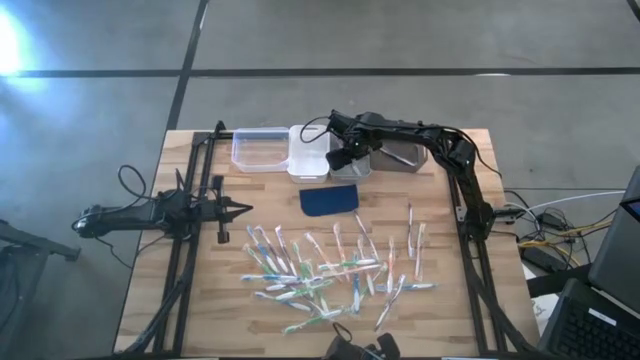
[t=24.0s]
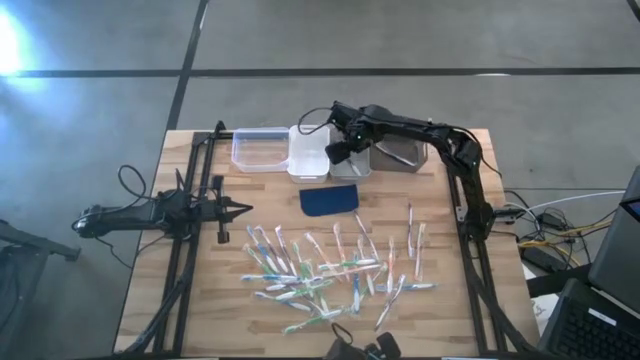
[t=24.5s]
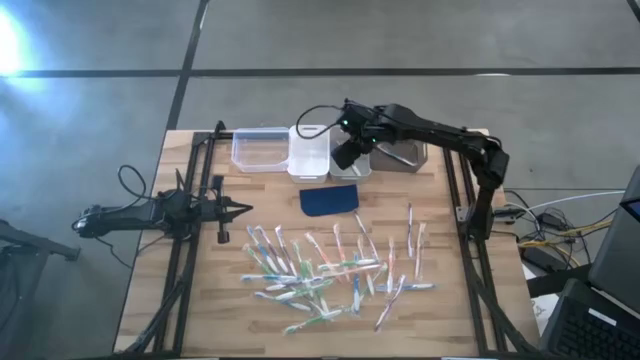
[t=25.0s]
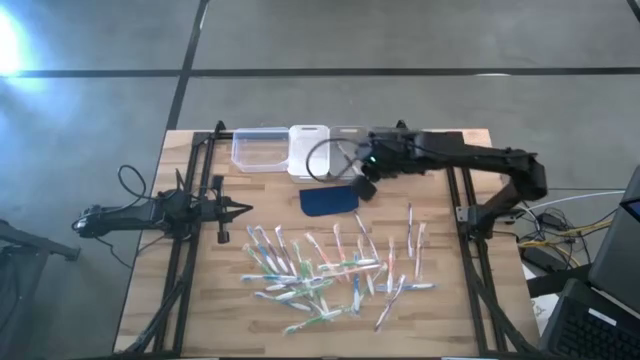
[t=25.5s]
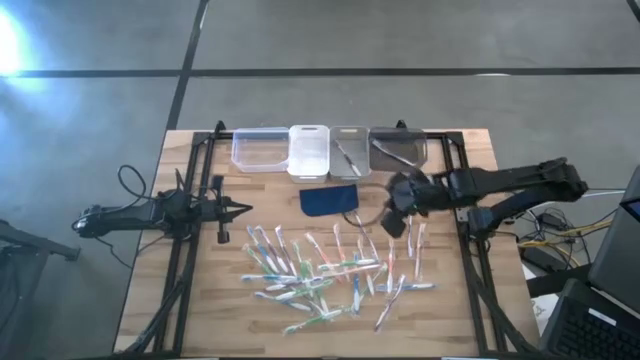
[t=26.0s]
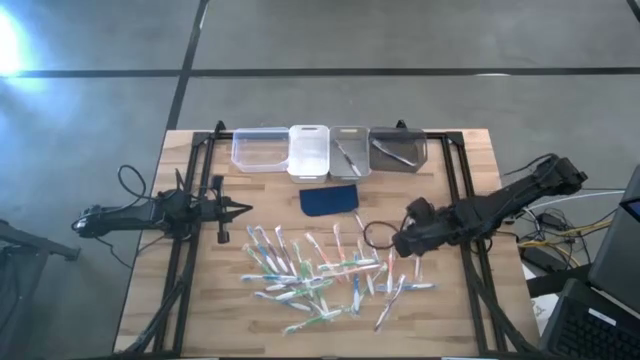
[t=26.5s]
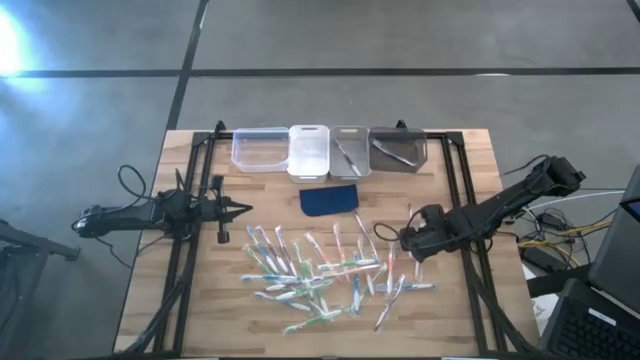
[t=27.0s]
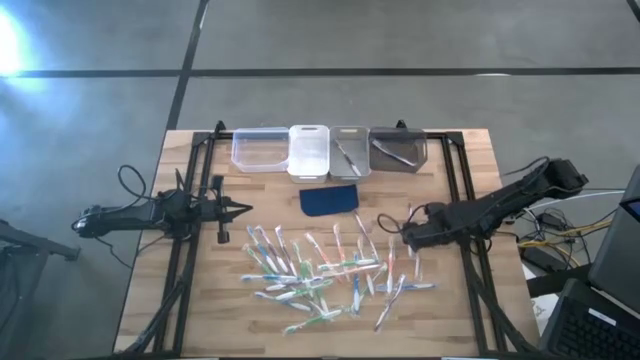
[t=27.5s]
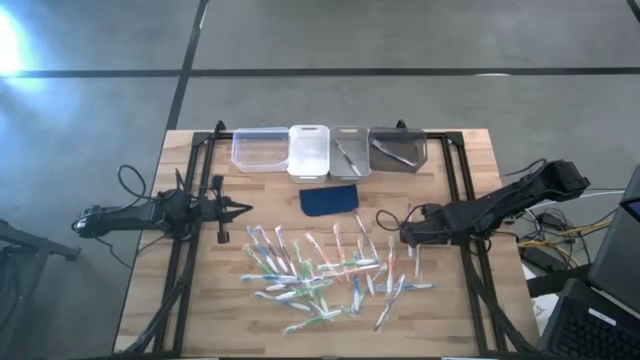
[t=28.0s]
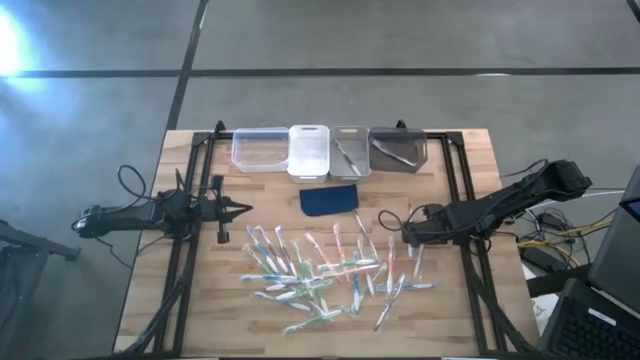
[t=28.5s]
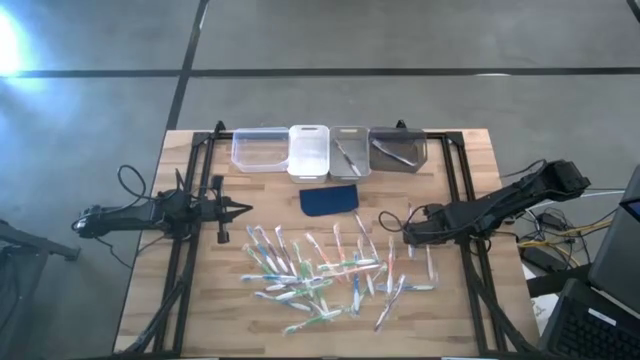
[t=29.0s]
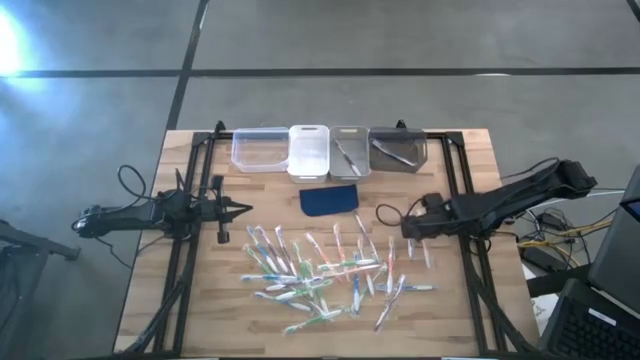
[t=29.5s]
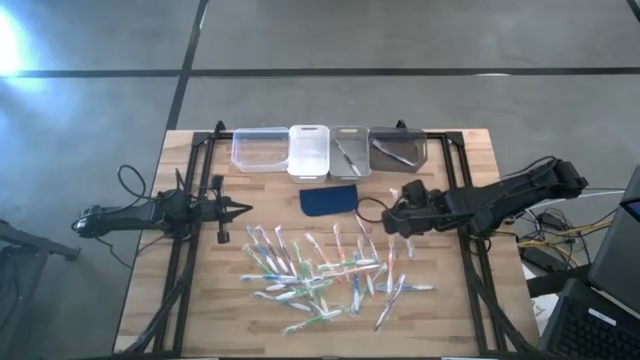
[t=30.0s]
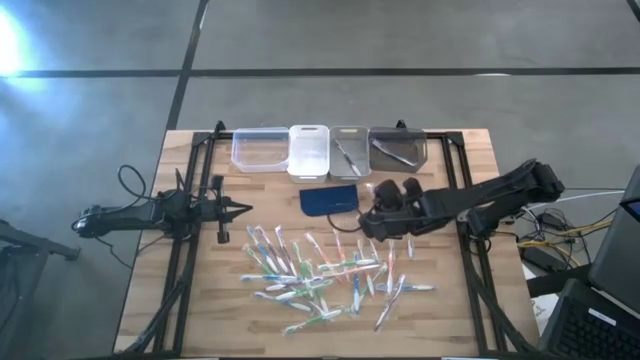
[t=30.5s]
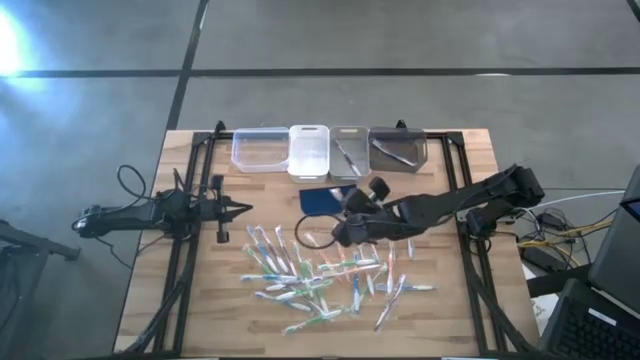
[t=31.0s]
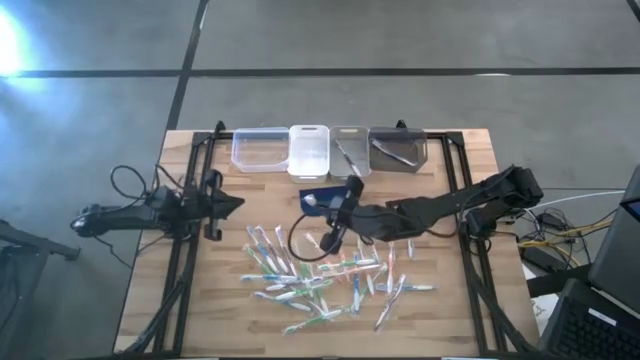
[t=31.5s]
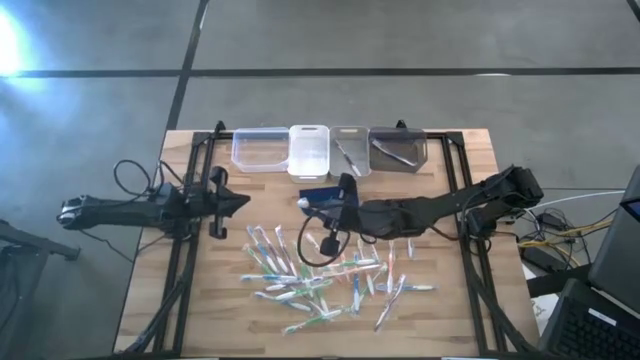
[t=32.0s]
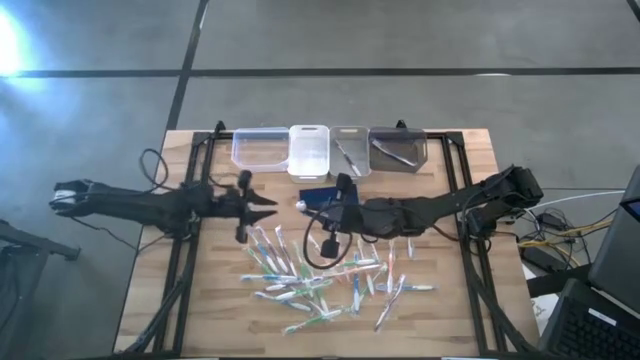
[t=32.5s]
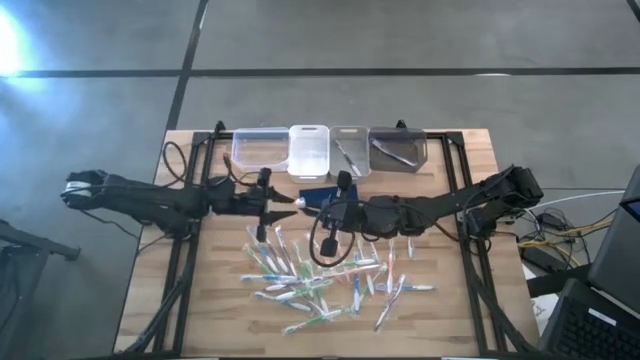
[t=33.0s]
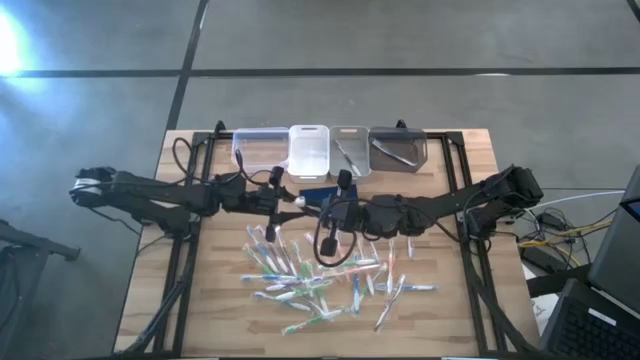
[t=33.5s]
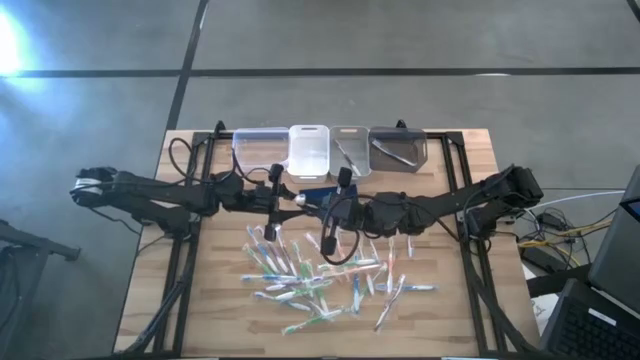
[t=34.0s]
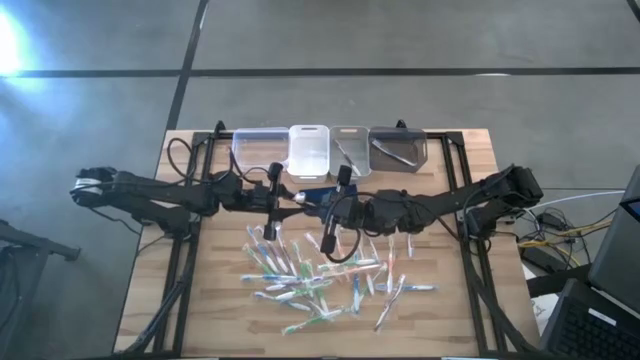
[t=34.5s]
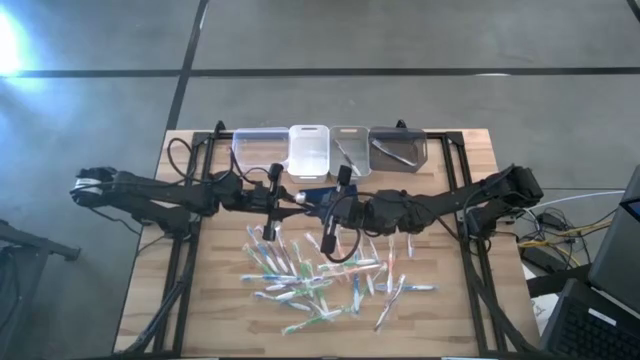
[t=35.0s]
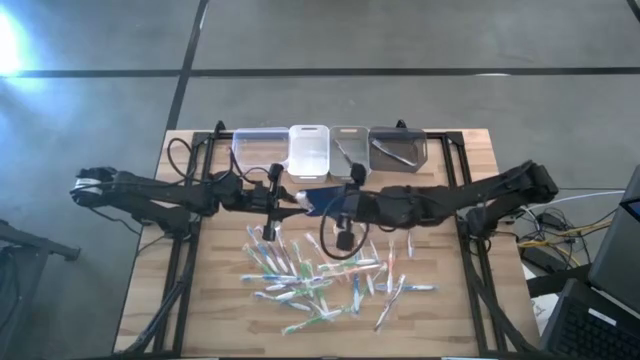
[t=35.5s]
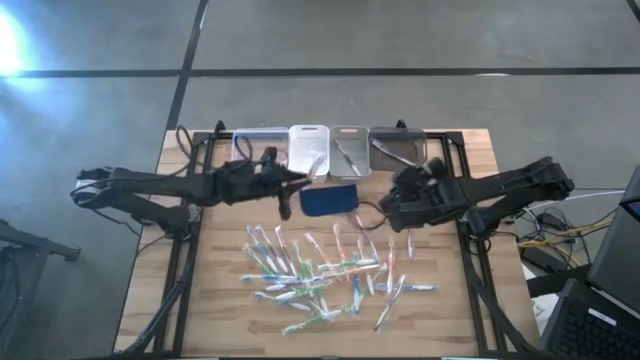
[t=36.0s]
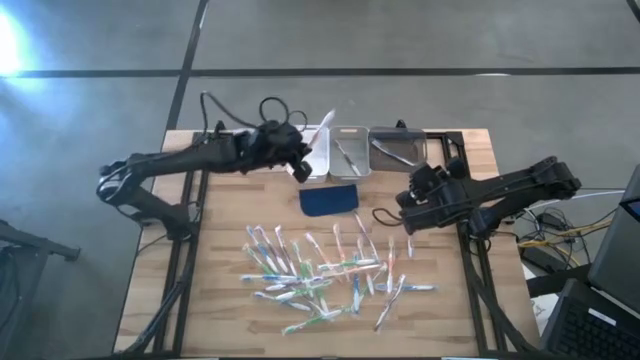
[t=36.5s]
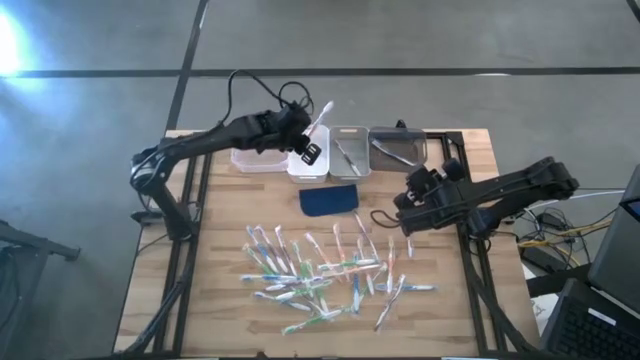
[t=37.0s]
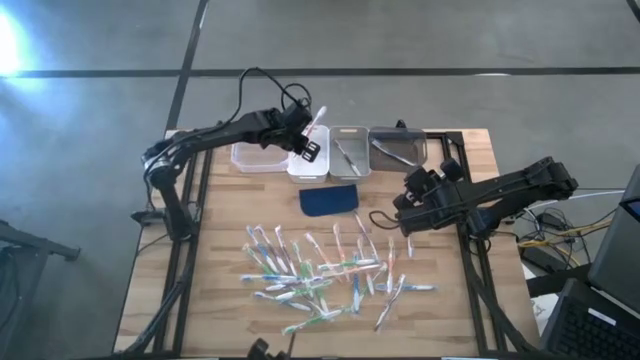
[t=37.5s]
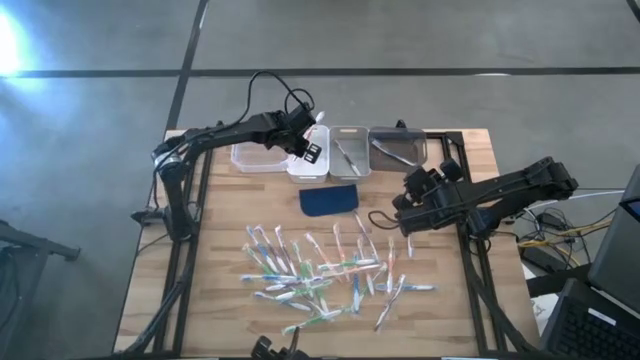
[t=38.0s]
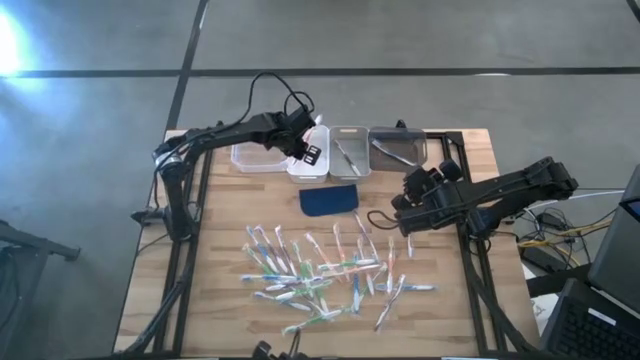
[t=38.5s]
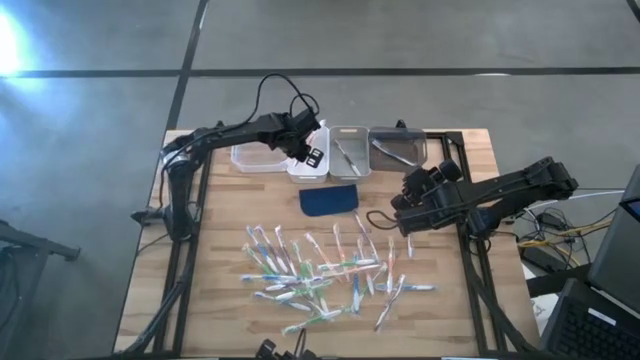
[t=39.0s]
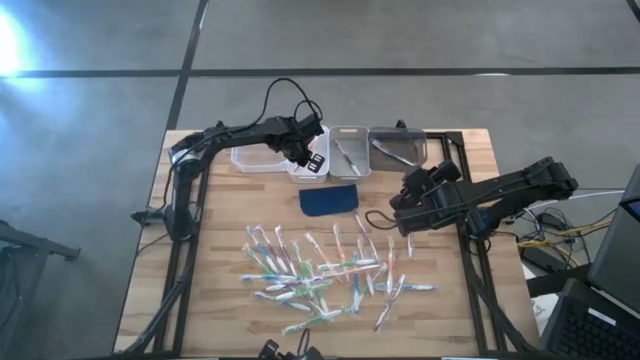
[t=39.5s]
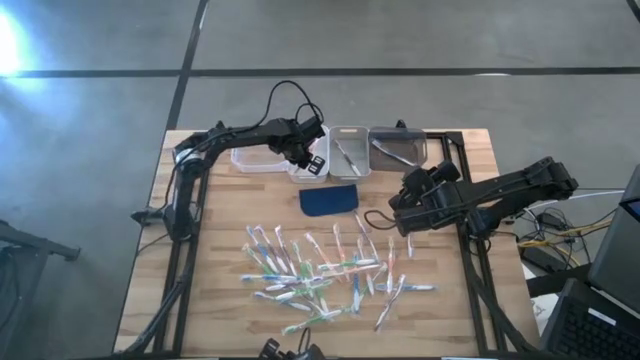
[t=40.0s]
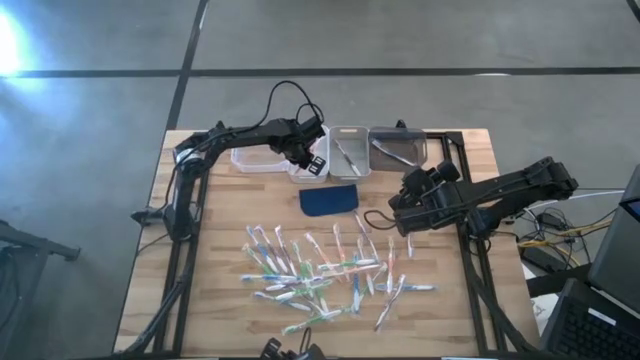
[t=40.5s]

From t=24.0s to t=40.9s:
Task: Pick & Place Toothbrushes
Put the orange toothbrush into the white bin

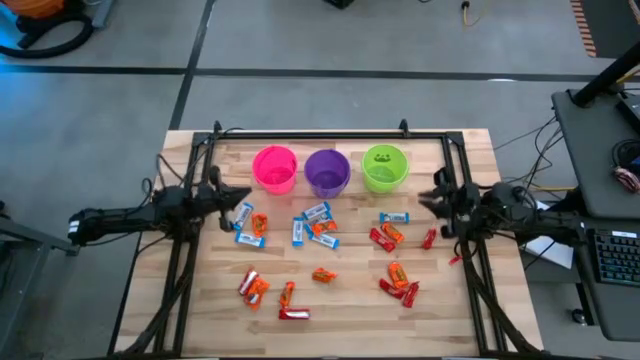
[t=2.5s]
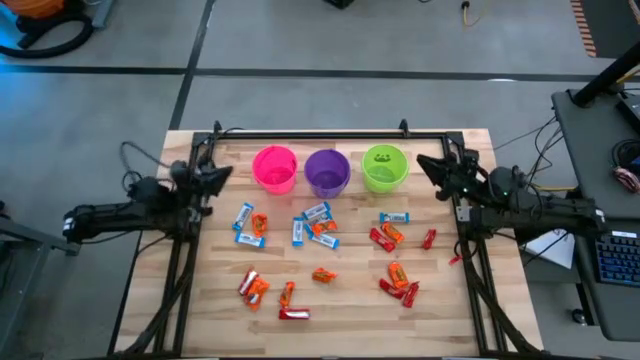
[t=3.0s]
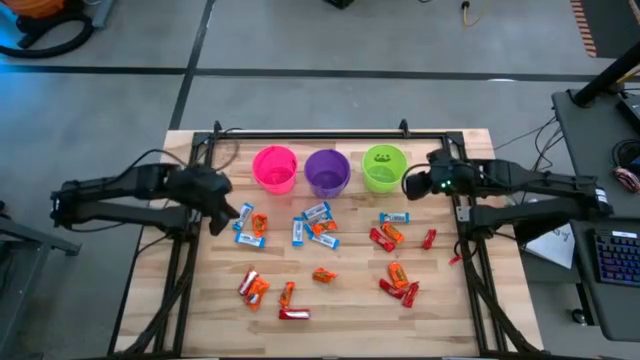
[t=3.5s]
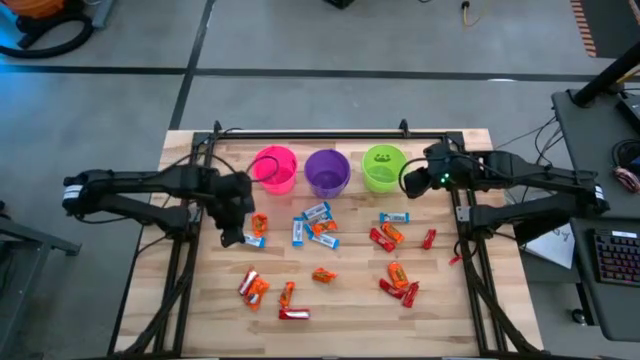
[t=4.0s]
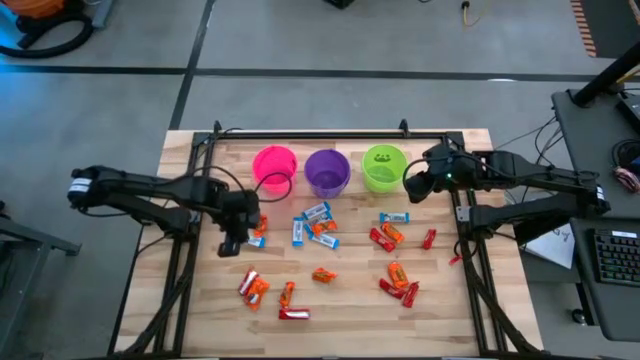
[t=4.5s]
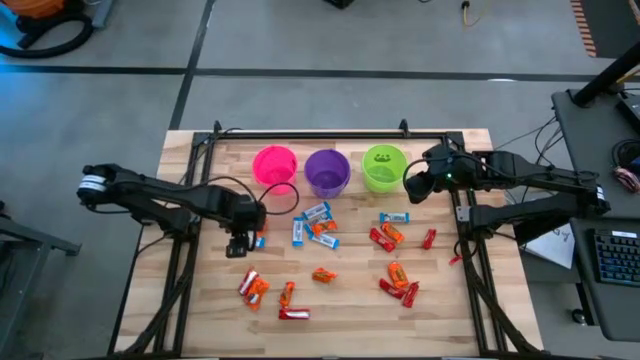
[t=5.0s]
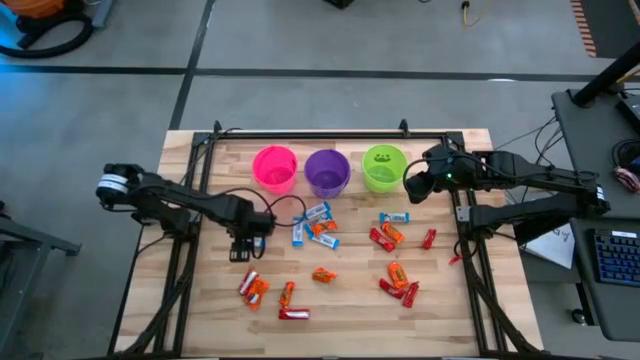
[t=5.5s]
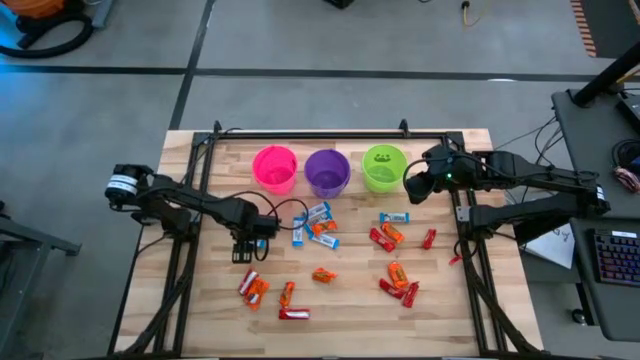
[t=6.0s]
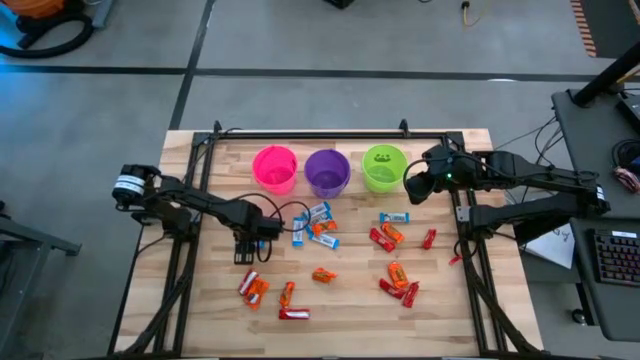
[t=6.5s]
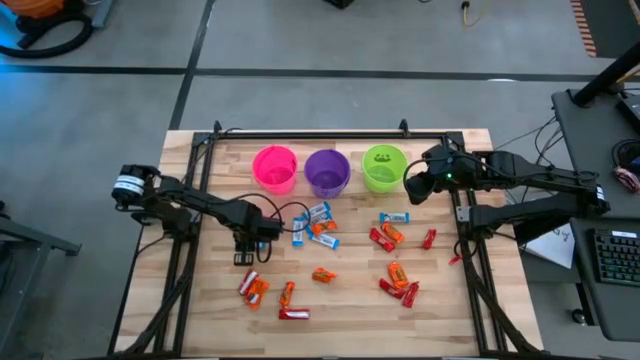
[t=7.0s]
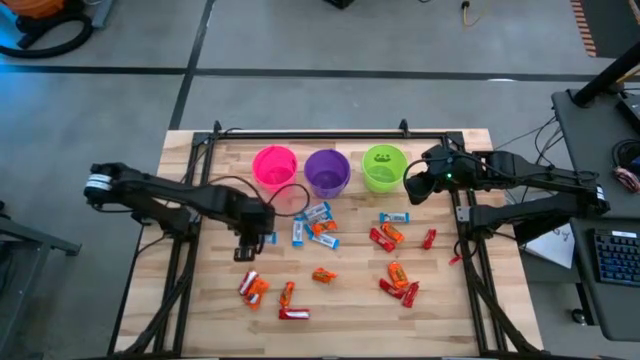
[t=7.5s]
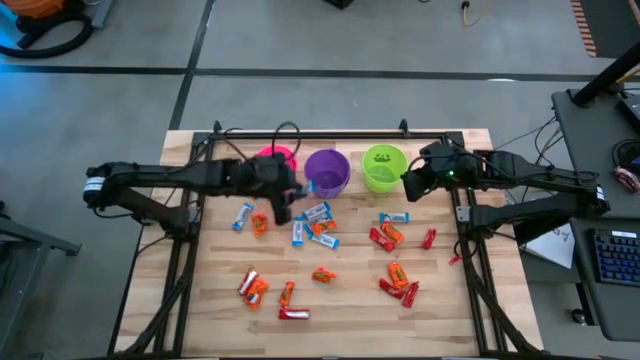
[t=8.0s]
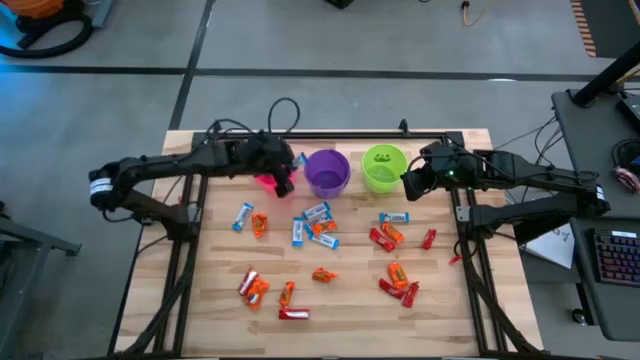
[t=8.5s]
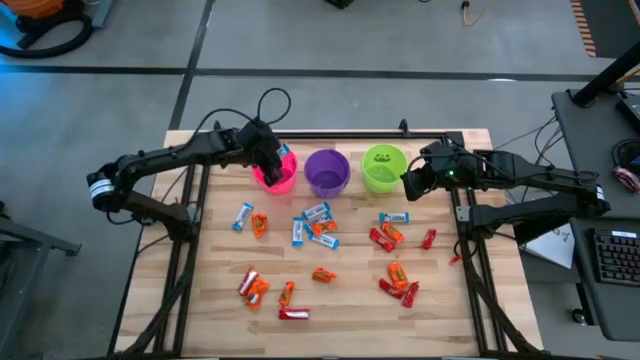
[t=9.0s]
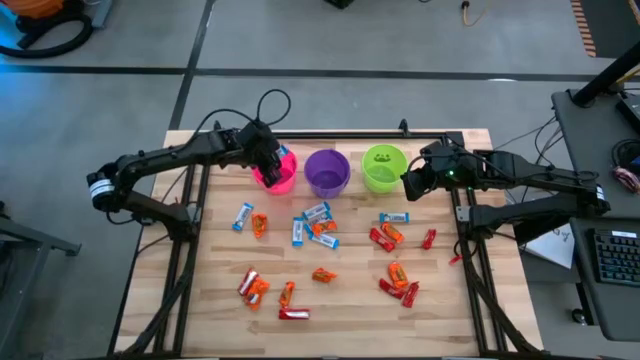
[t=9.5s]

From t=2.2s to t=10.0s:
Task: Organize candy in baskets
Put the white chocolate into the pink bucket
